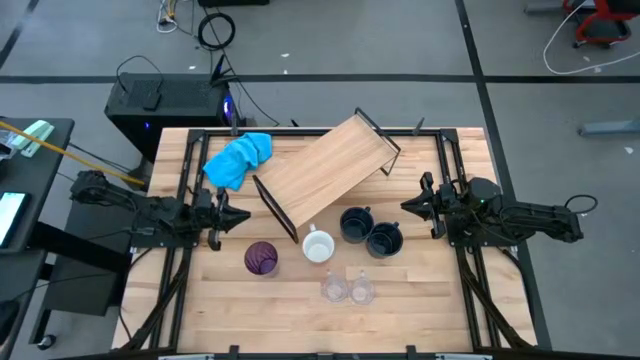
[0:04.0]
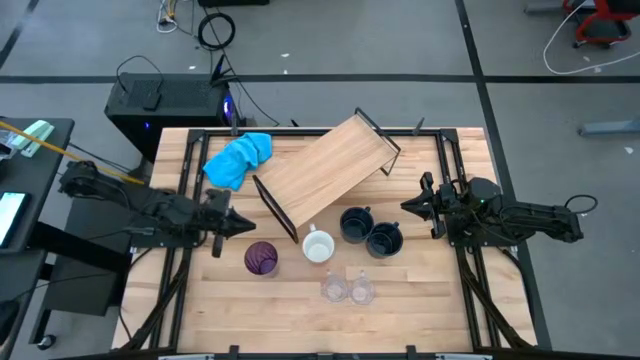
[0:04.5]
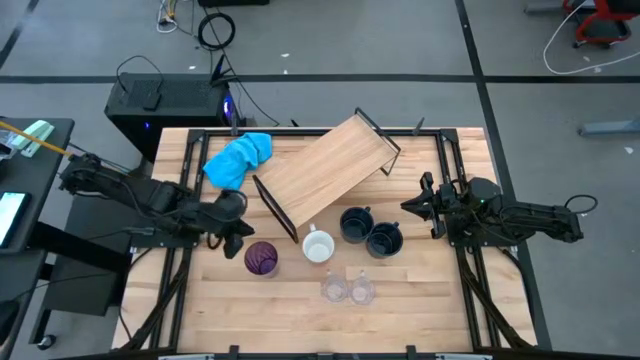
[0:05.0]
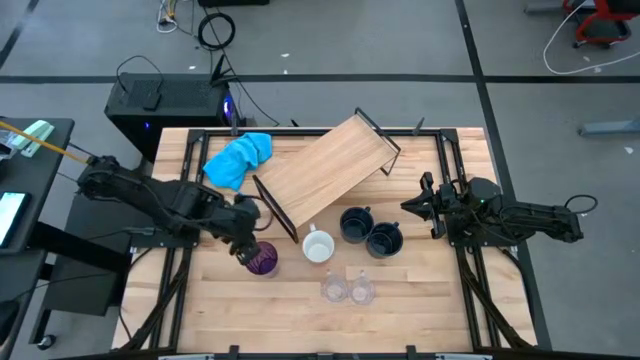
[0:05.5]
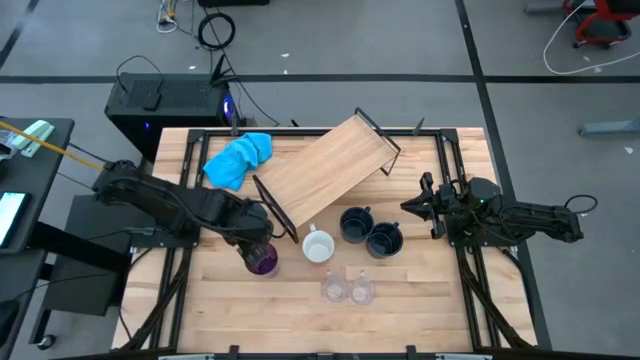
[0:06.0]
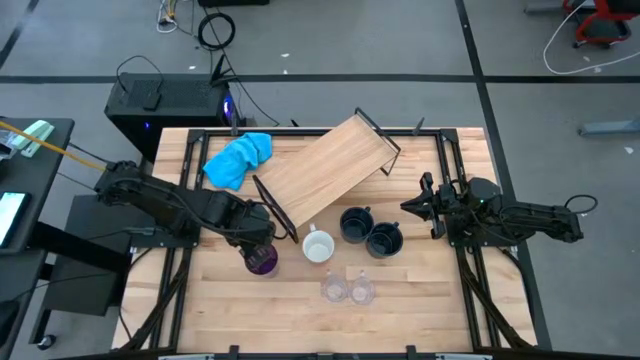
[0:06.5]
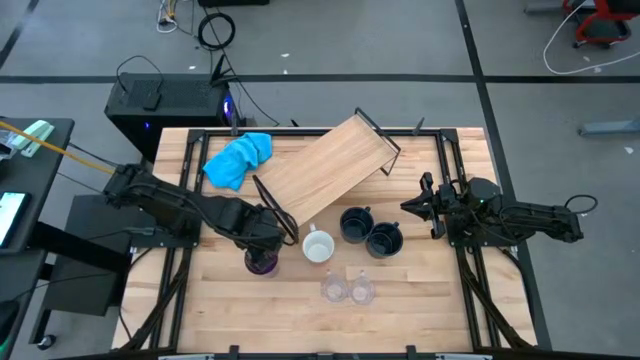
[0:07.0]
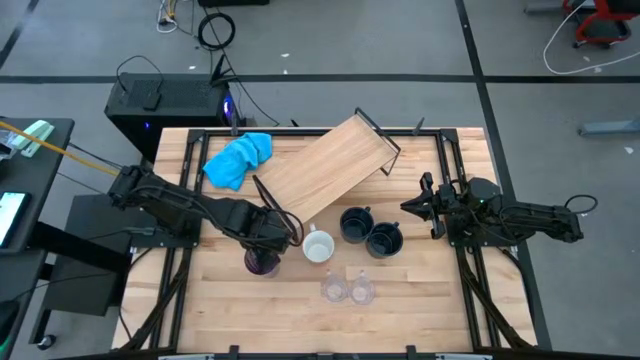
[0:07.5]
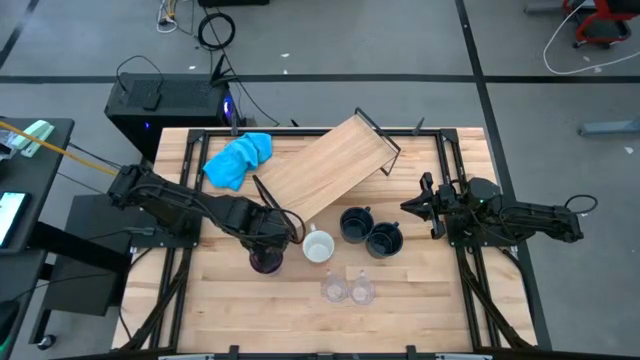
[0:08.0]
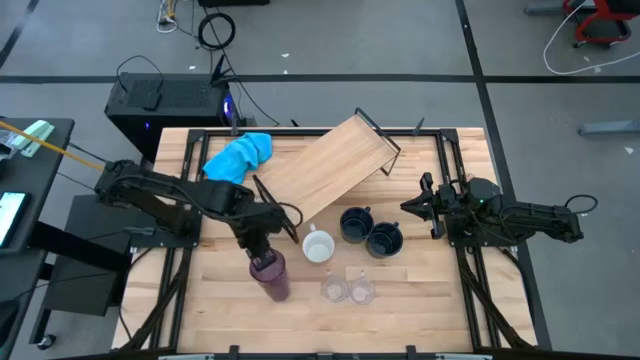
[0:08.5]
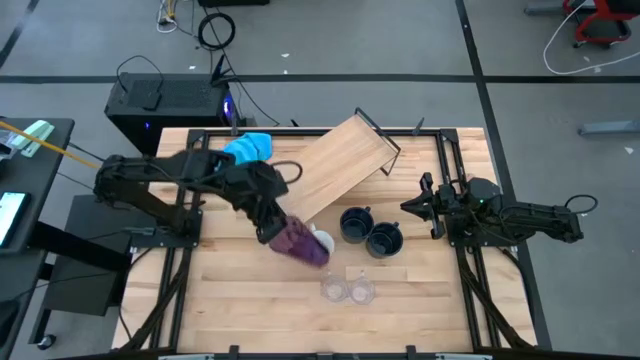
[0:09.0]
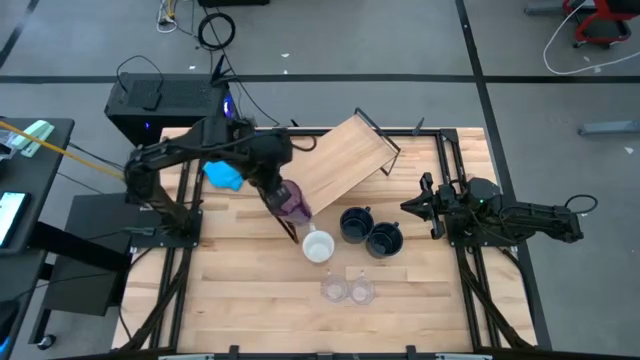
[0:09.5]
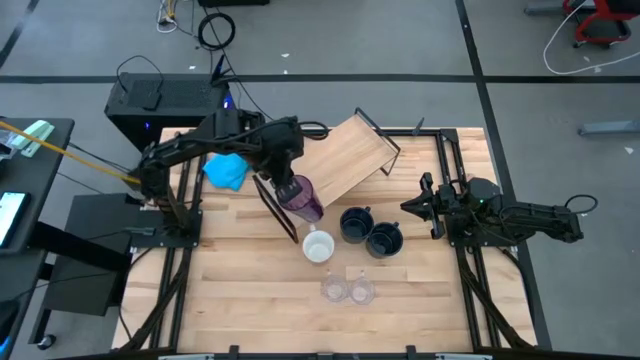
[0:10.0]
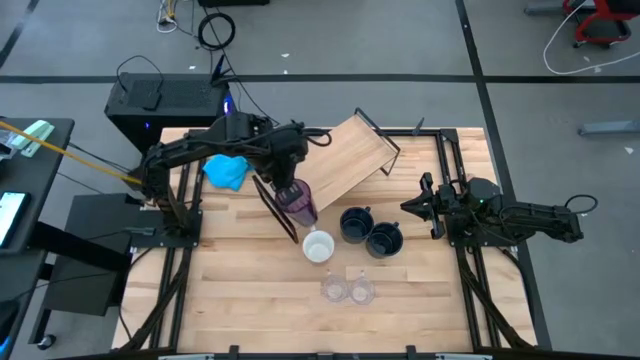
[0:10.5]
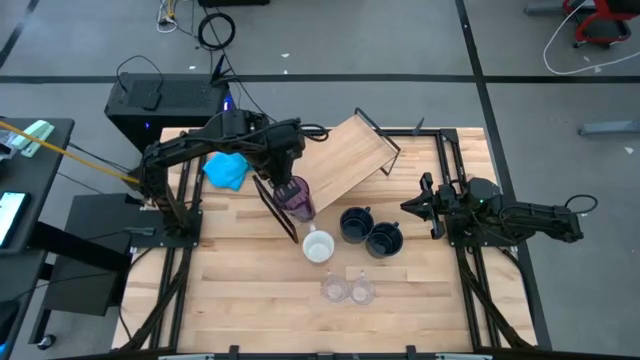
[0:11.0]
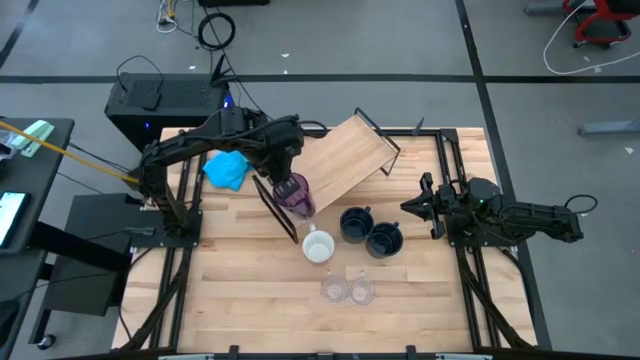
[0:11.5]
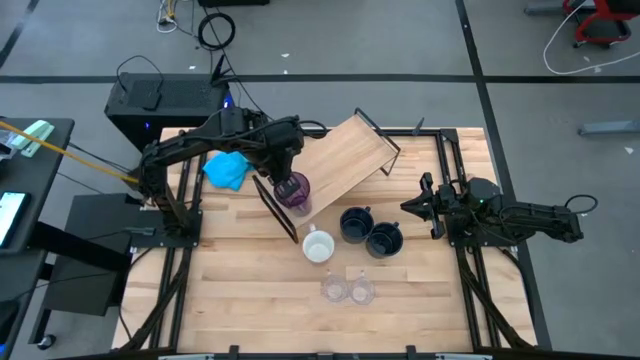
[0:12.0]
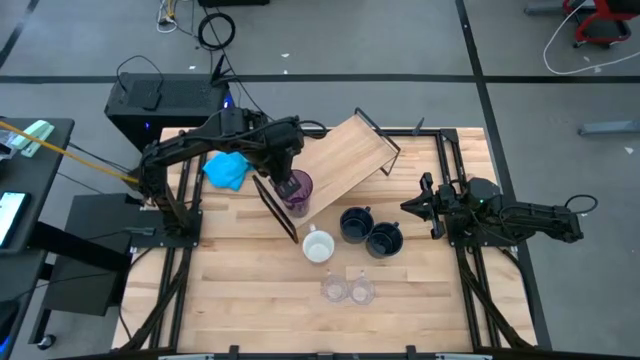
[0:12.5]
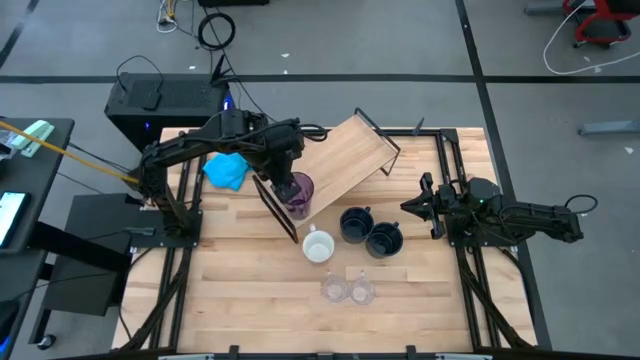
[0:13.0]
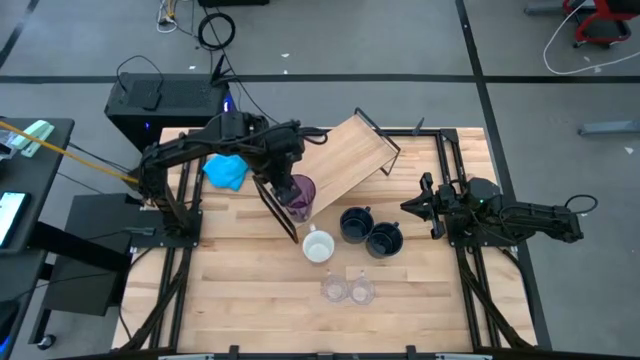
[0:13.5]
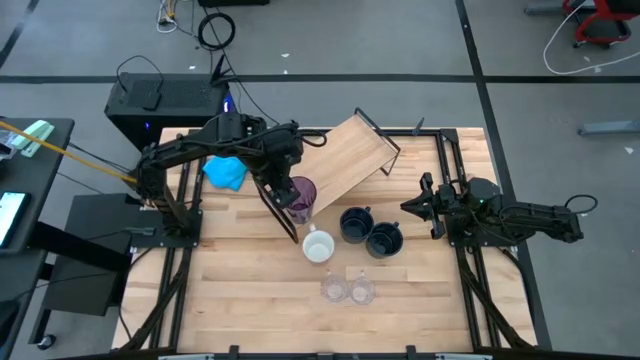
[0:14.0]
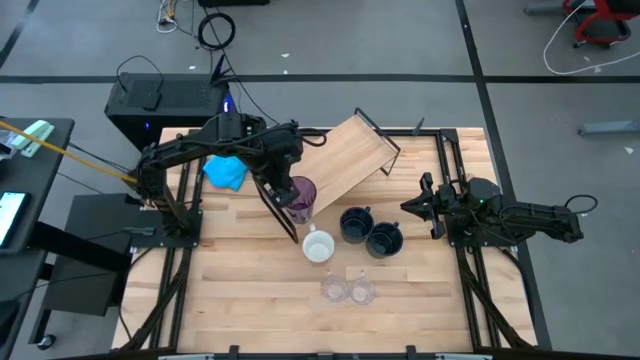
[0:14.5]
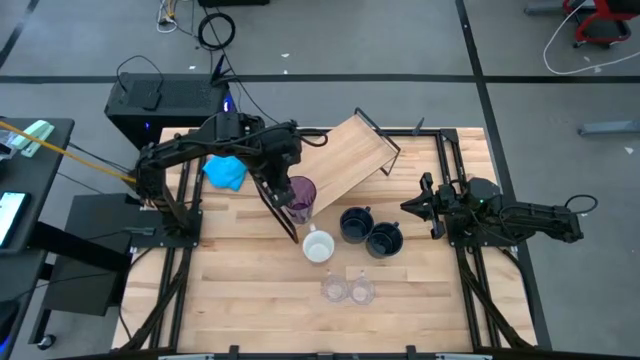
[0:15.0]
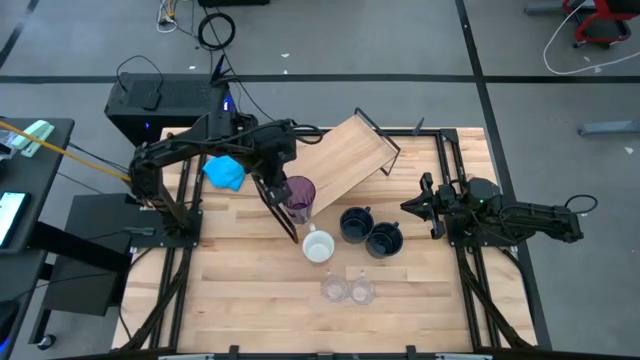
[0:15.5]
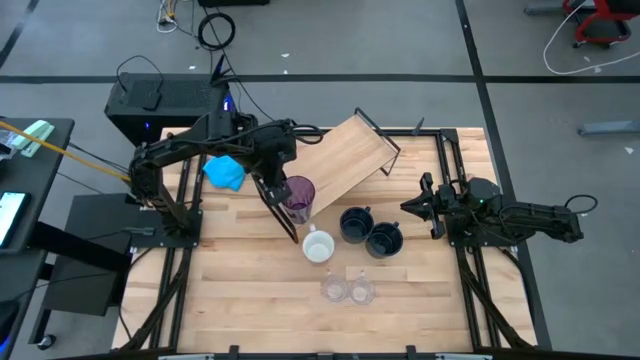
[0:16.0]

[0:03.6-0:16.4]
Task: Stack small to large cups/mugs on shelf
Put the violet cup on the shelf

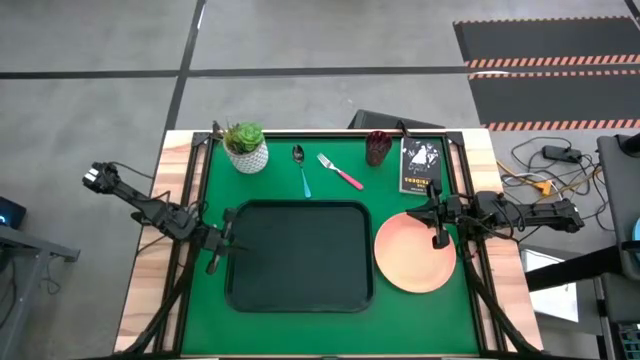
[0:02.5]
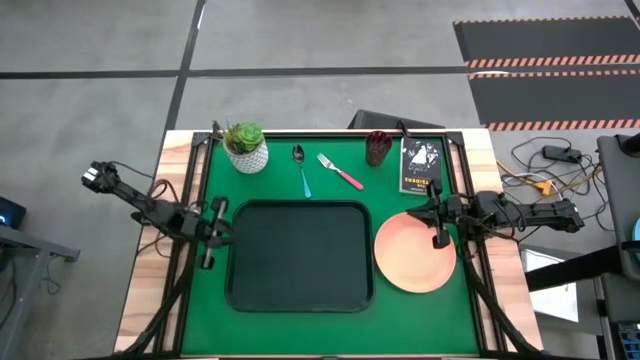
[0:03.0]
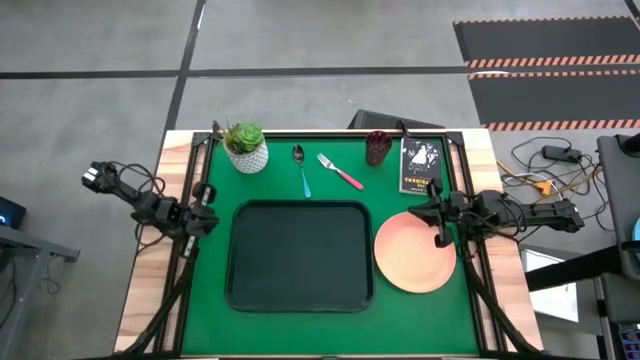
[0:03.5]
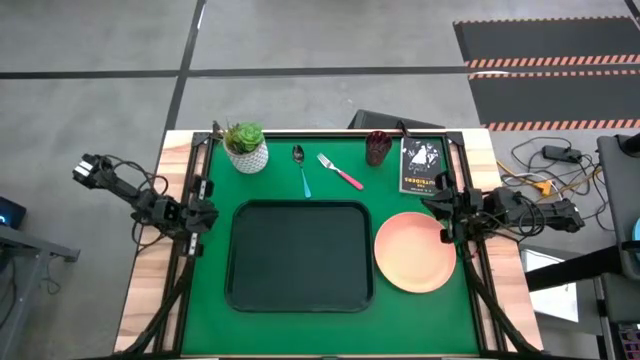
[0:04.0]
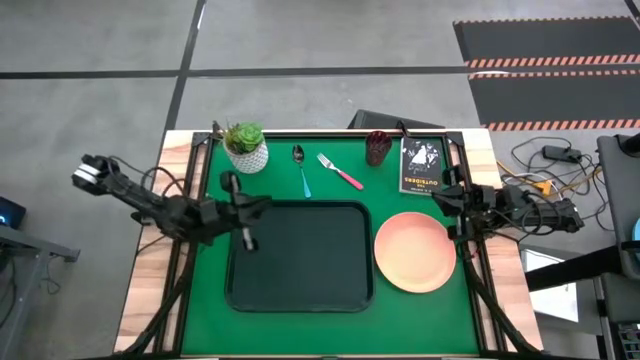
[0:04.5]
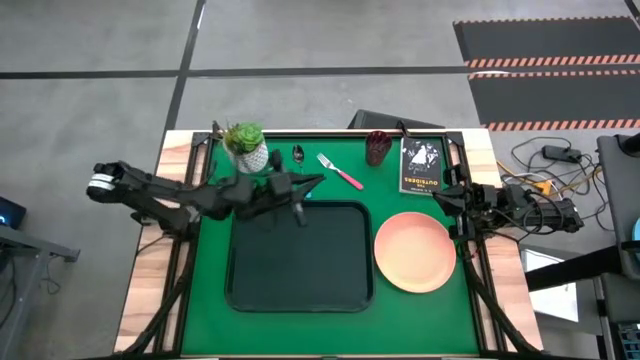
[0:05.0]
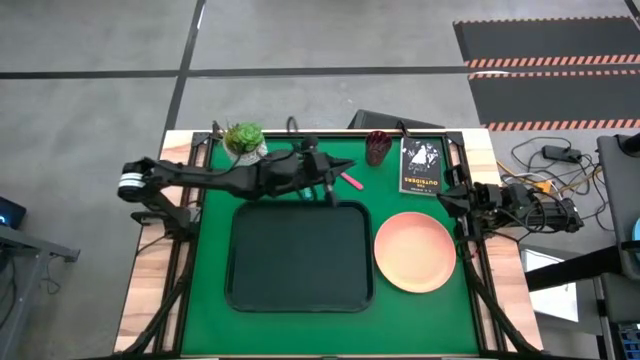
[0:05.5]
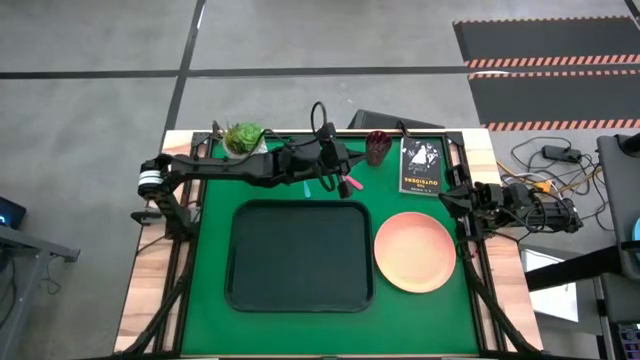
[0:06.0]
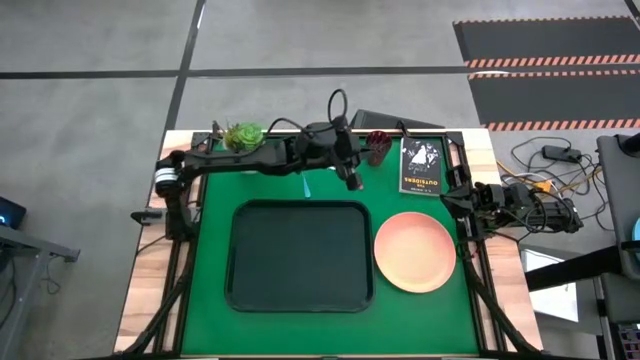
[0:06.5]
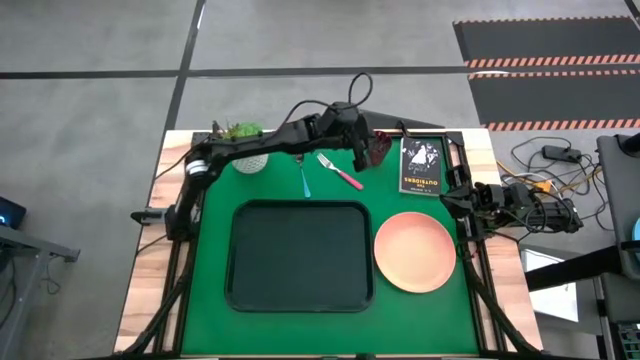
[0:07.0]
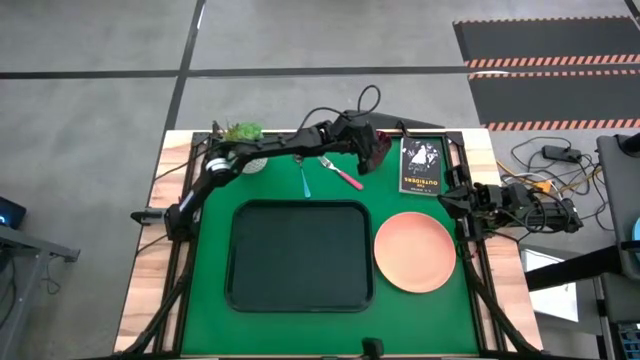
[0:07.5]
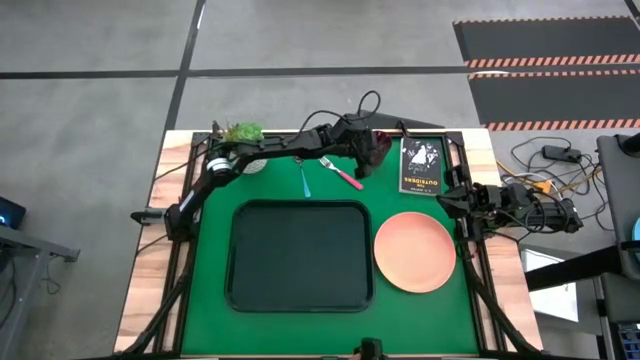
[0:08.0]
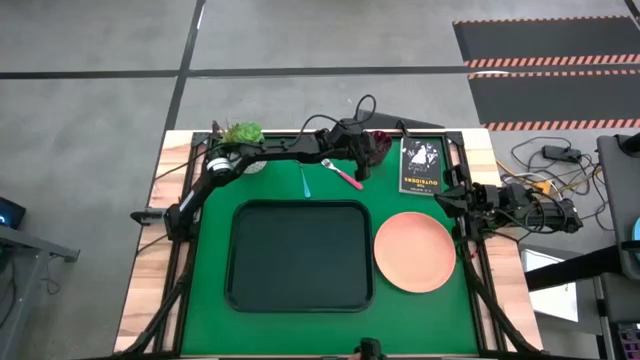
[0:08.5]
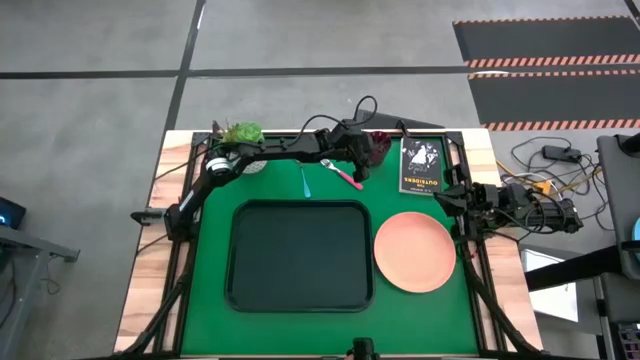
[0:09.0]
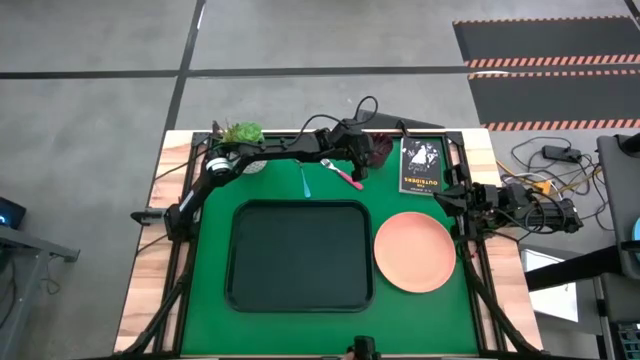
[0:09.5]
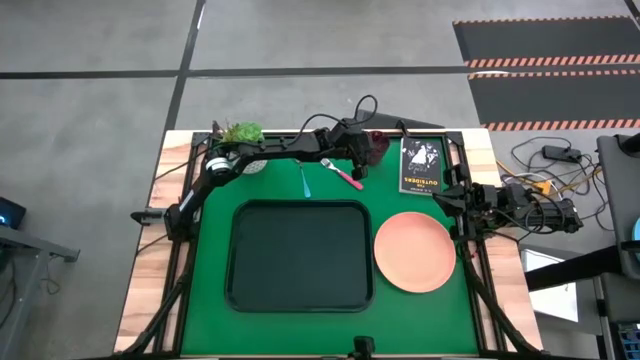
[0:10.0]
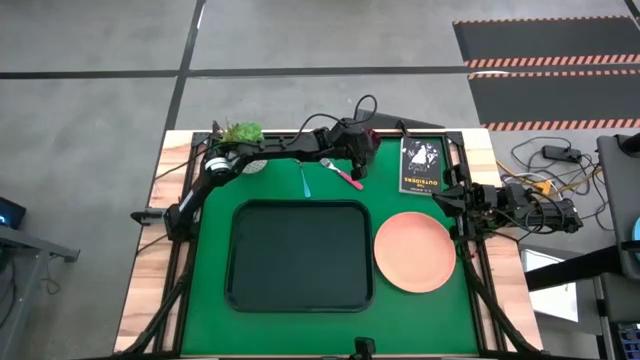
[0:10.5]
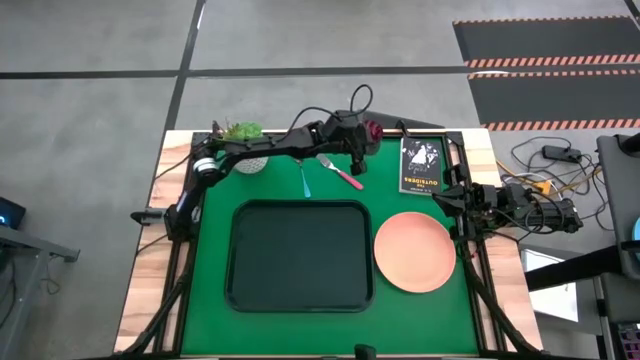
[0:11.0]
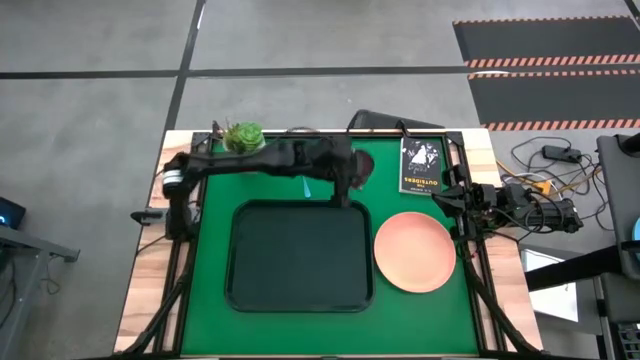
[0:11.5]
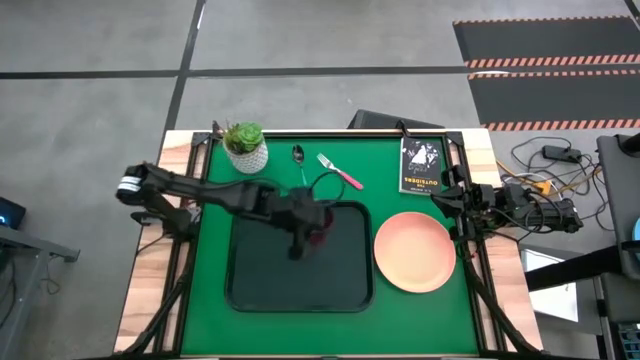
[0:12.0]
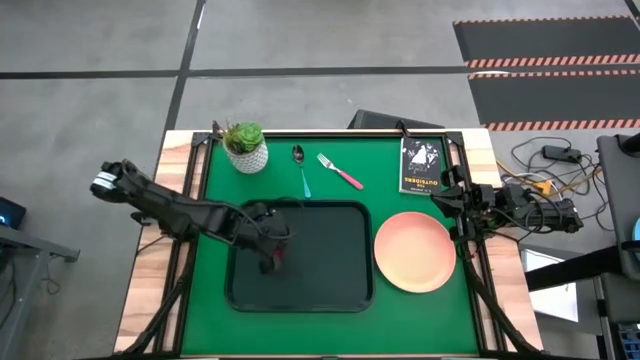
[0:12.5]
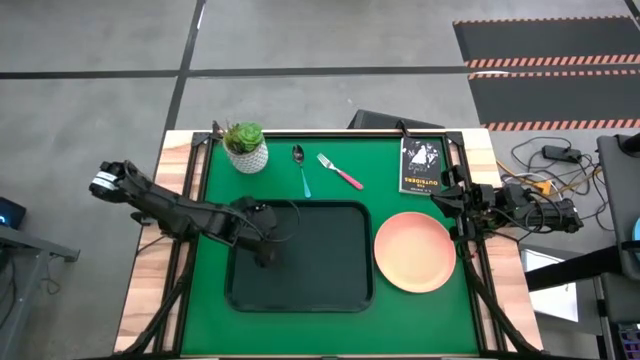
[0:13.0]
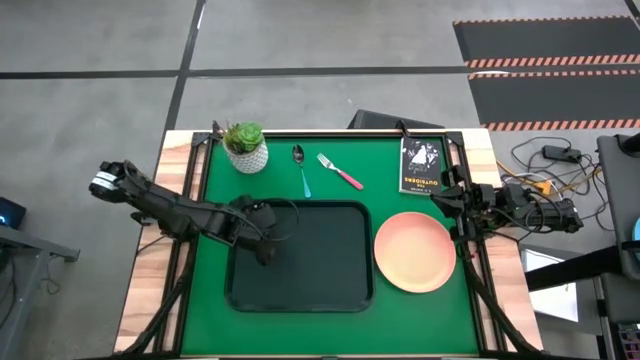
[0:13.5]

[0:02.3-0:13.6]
Task: Pick and place plate/cup/fork/spoon on tray
Put the red cup on the black tray
